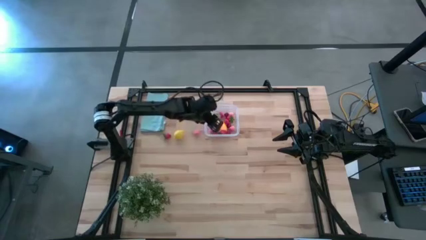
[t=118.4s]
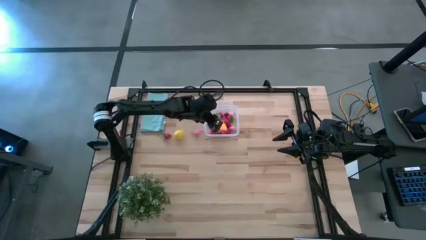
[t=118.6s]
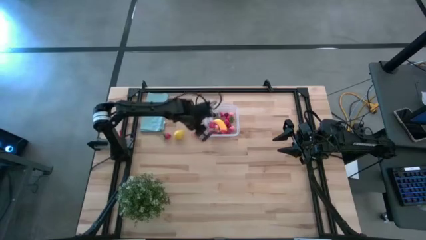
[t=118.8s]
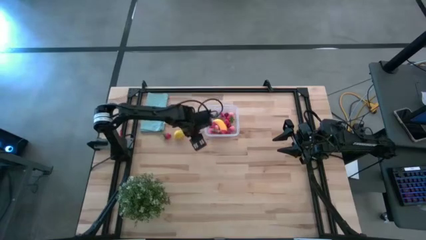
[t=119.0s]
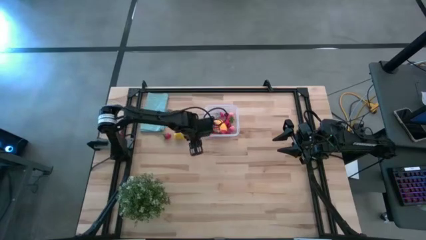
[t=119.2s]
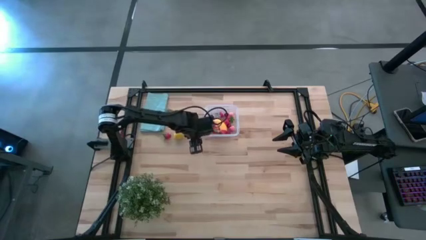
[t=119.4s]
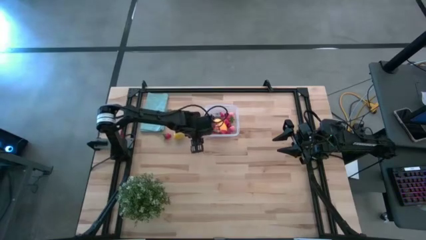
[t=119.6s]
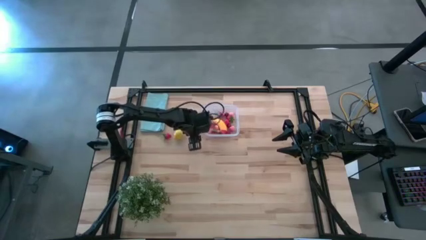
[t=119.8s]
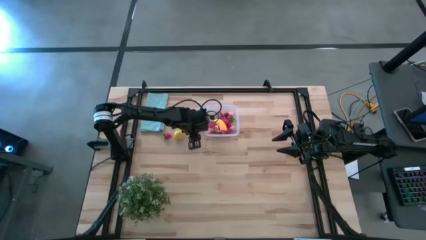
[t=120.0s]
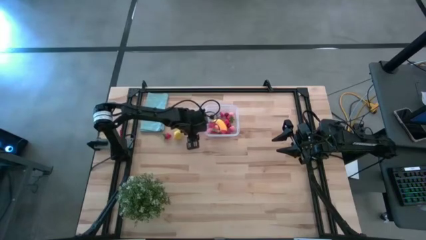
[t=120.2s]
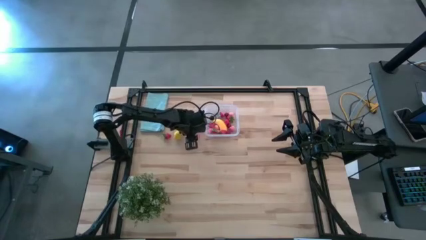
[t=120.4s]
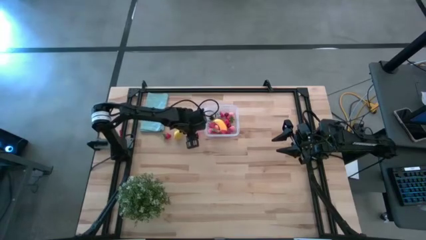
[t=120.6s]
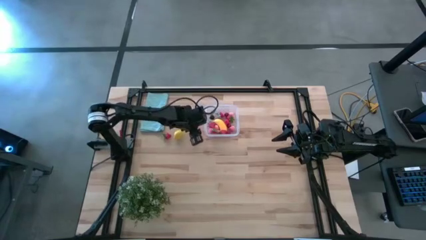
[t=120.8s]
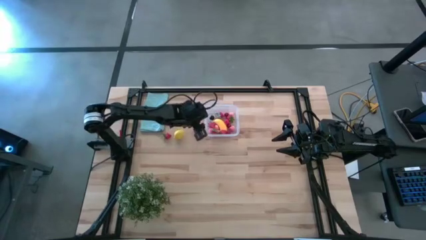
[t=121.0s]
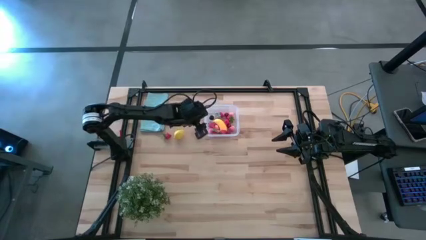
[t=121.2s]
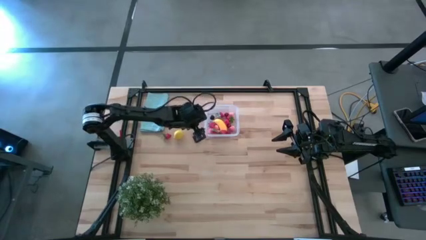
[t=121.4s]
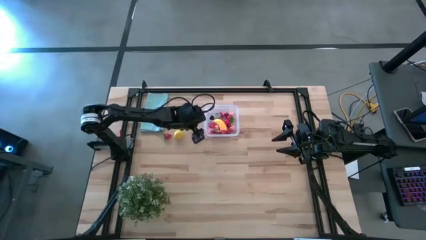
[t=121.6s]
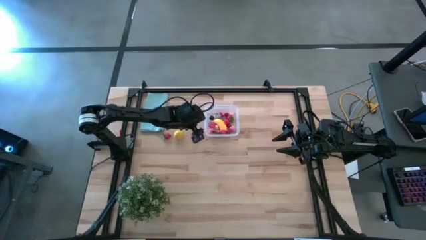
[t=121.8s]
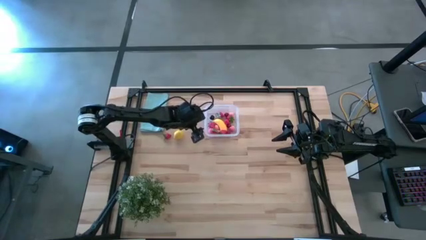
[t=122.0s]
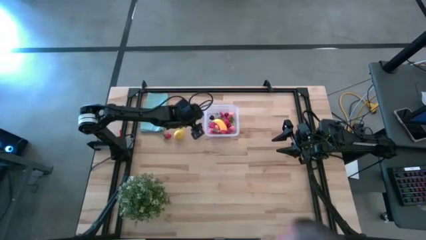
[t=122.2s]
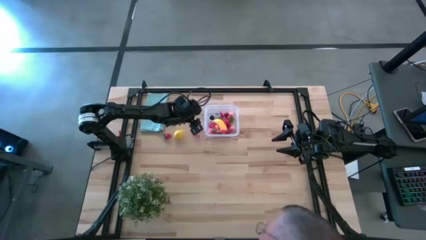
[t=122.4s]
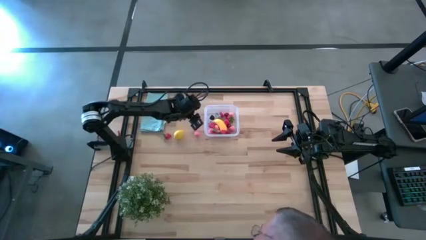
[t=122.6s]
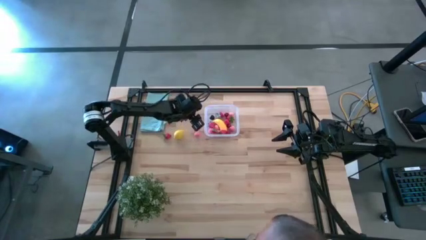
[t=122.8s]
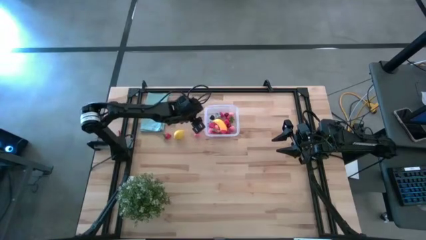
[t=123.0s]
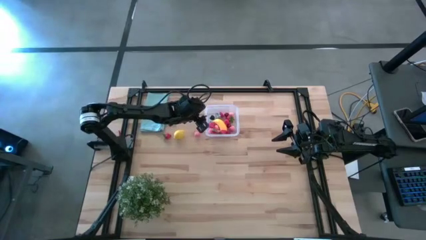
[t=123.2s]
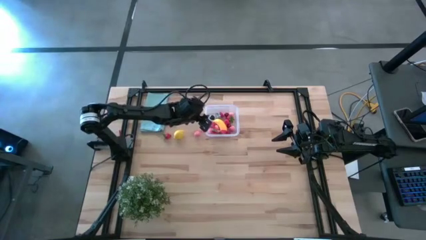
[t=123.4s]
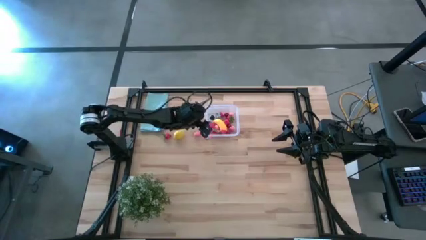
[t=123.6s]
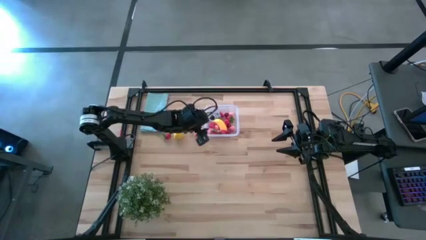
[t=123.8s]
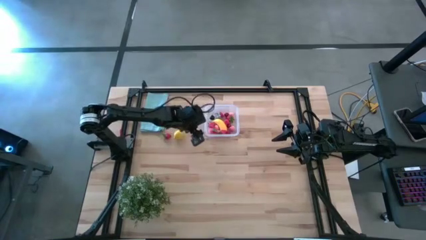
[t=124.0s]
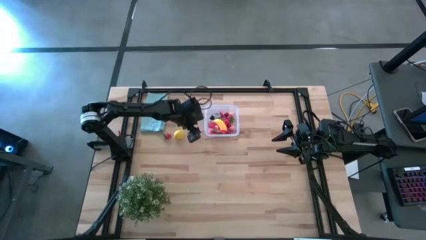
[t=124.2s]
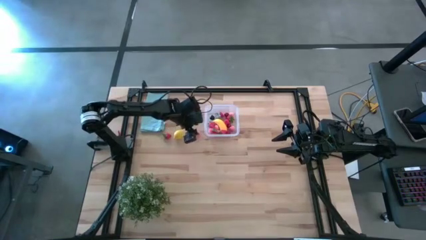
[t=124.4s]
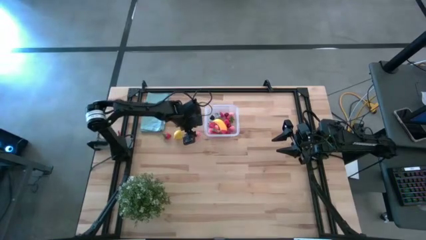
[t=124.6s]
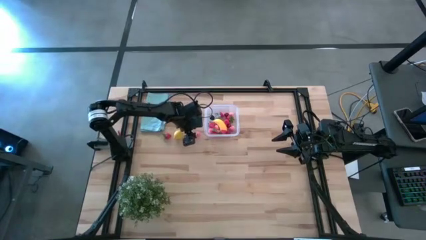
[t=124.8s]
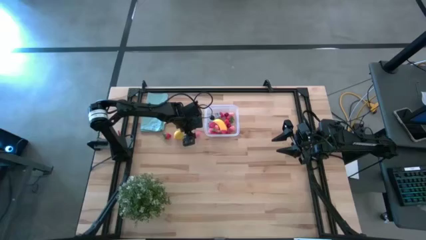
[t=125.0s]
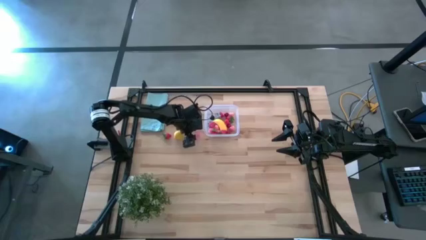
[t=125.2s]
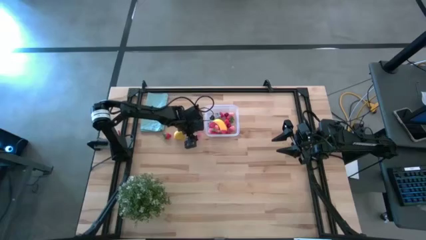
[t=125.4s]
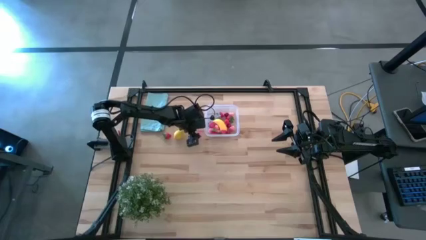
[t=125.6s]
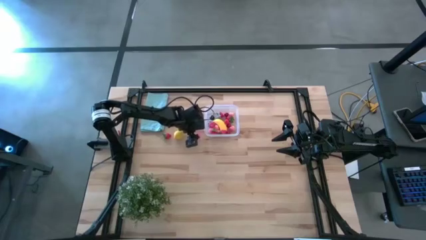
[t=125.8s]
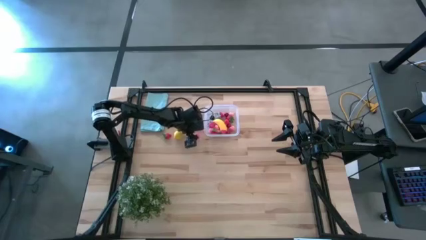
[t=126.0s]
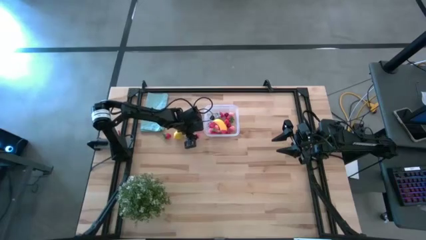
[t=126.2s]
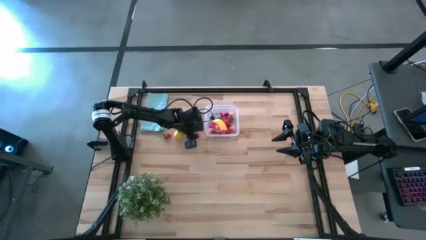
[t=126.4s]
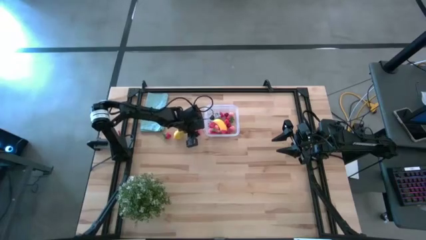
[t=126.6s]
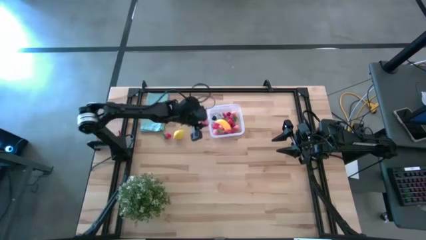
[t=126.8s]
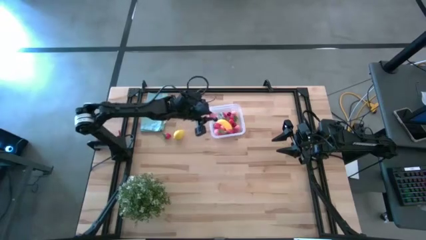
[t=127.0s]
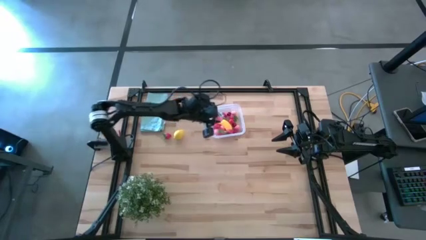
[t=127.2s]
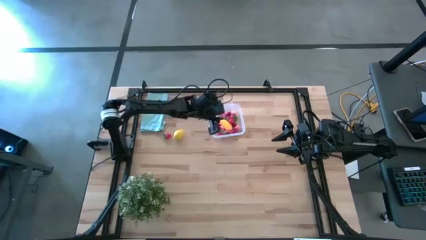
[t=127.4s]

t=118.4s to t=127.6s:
Task: Pick and placing Produce into tupperware
Put the pink peach into the transparent bin

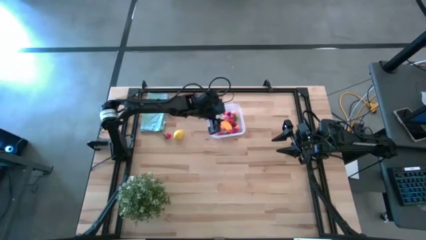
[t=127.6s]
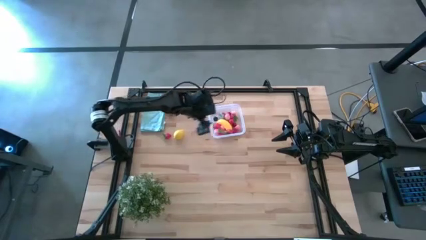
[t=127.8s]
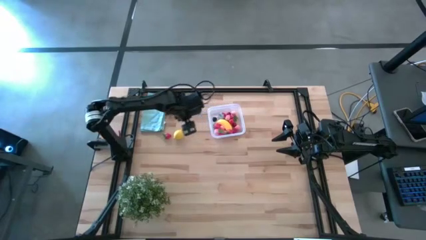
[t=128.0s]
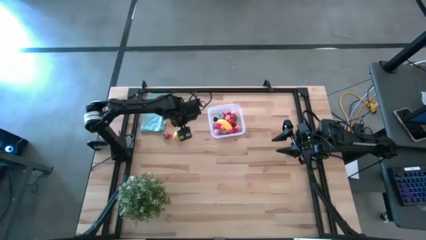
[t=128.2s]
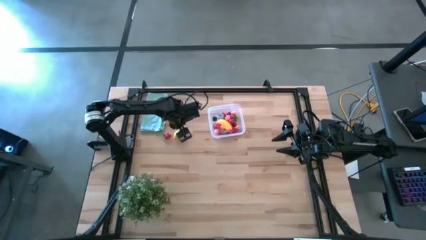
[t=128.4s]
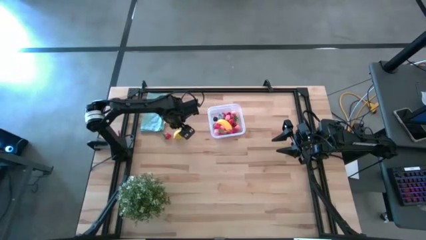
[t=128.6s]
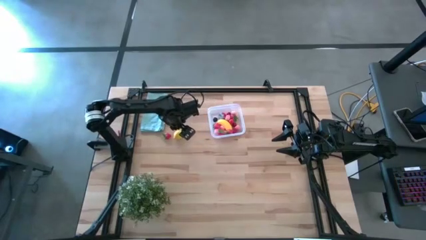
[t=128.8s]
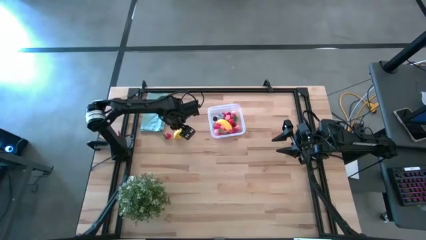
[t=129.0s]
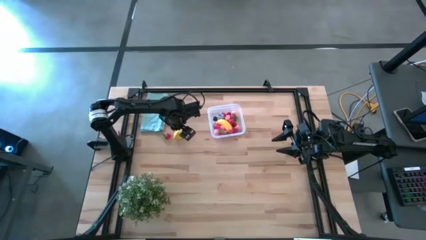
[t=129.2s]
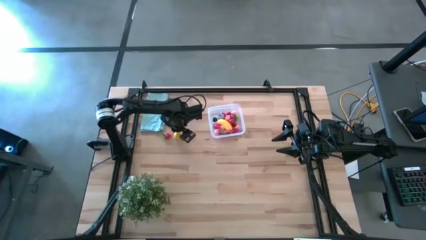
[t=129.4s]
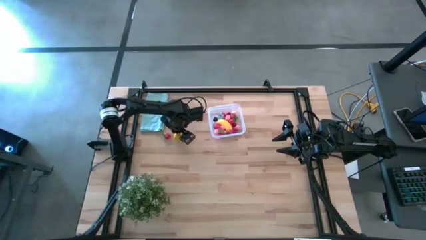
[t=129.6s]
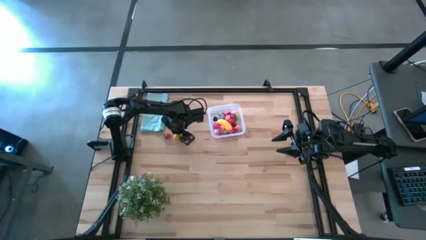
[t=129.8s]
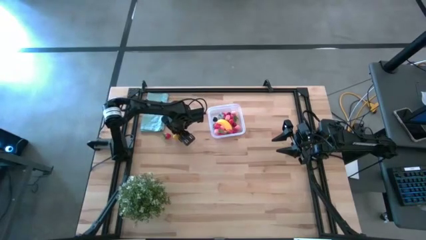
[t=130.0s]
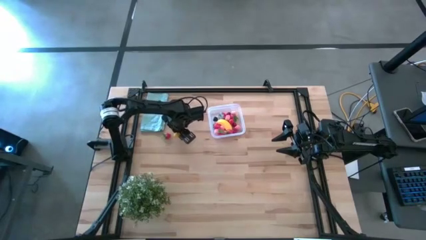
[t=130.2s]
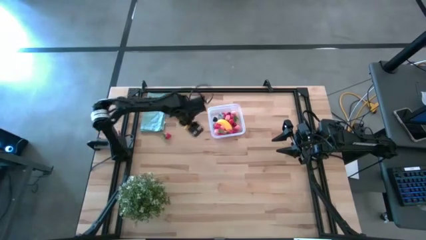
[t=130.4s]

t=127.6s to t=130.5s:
Put the yellow lemon into the transparent bin

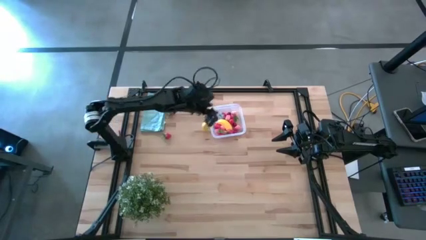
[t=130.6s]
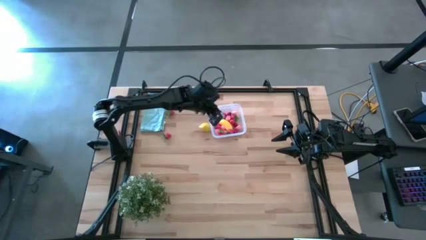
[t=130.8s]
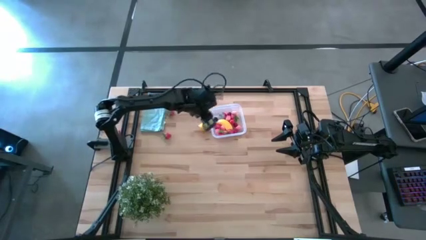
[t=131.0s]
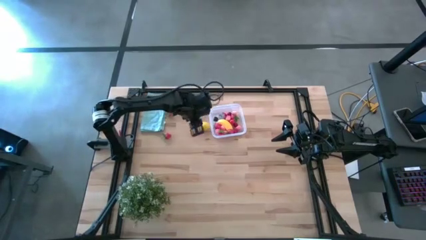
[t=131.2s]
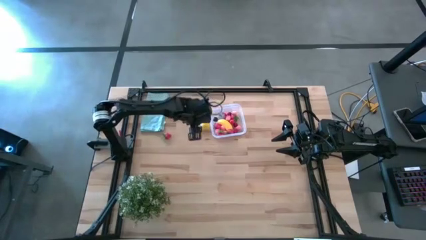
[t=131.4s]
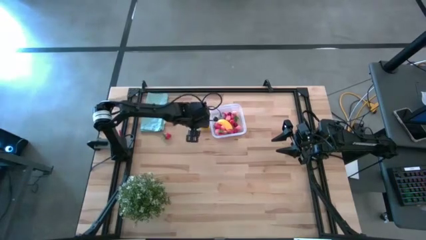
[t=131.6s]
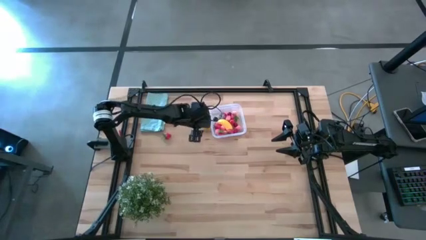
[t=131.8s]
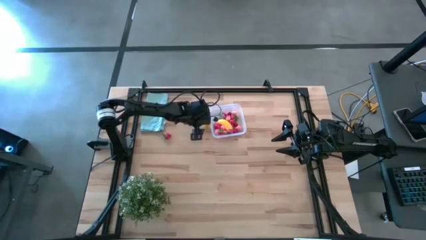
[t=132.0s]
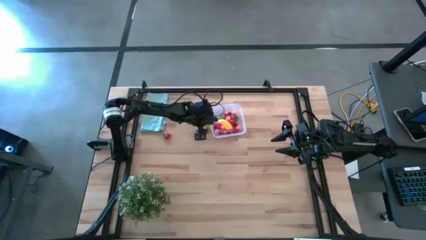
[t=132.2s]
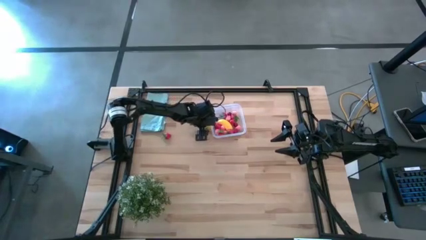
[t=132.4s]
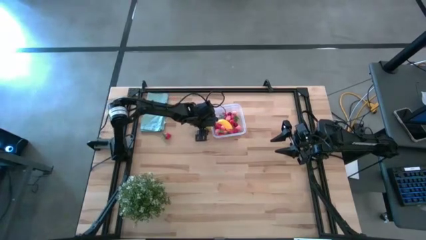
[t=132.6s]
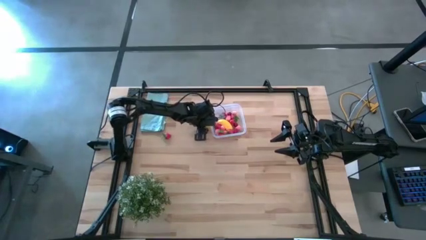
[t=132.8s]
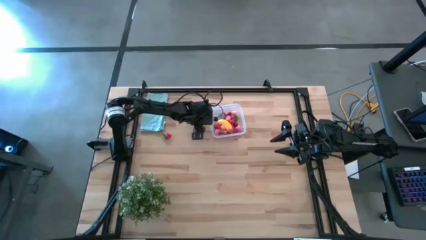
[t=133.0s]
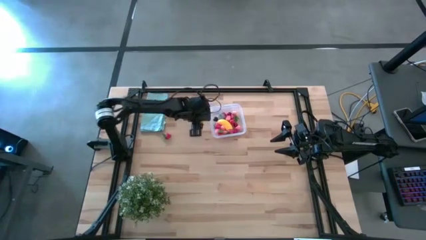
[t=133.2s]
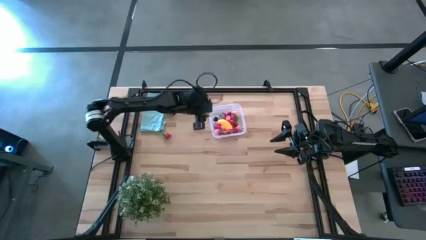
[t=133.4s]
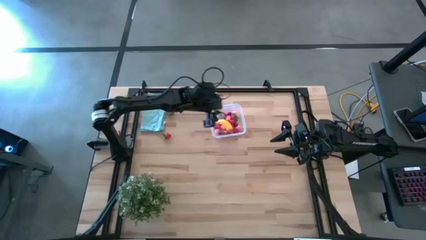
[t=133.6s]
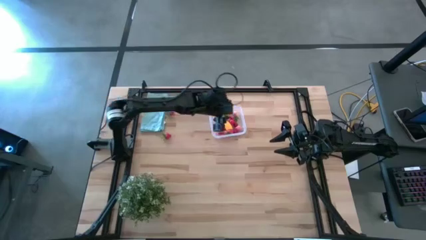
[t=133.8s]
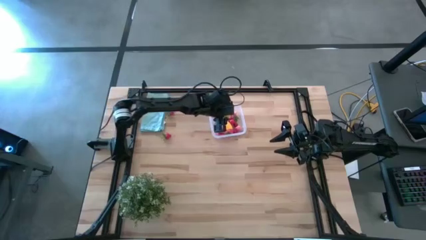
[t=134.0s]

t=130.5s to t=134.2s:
Put the yellow lemon into the transparent bin

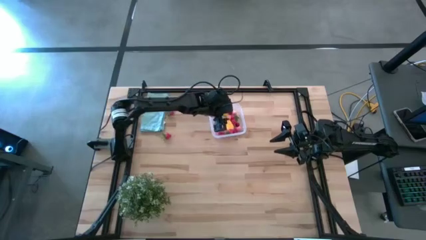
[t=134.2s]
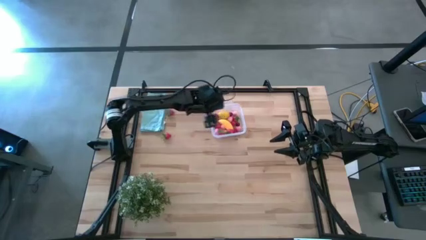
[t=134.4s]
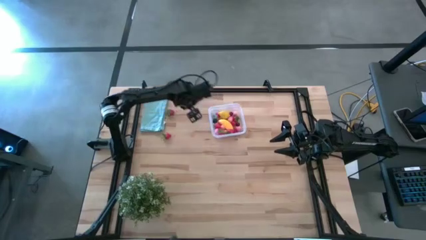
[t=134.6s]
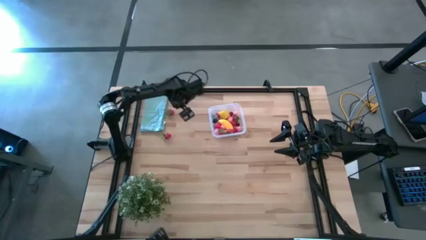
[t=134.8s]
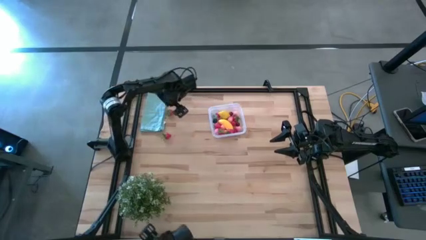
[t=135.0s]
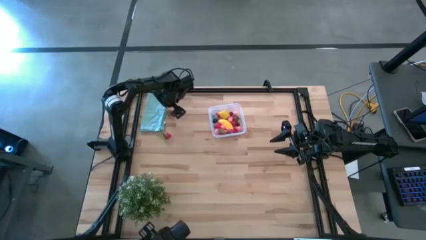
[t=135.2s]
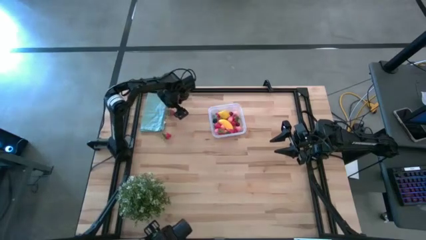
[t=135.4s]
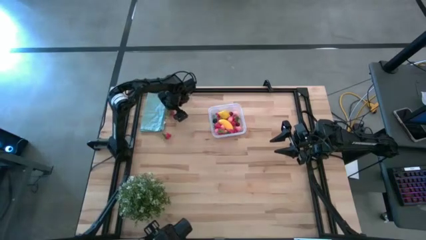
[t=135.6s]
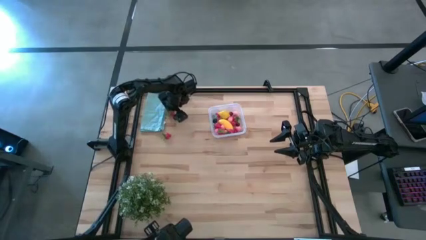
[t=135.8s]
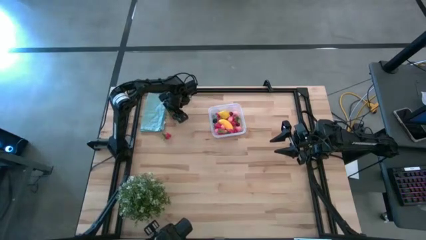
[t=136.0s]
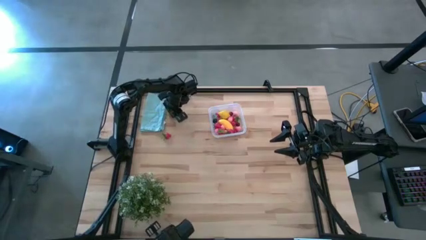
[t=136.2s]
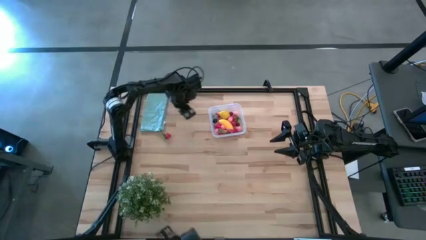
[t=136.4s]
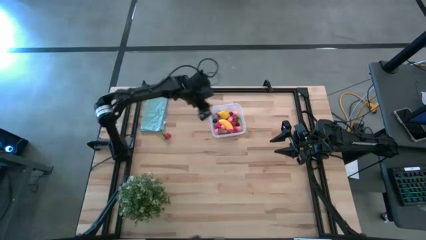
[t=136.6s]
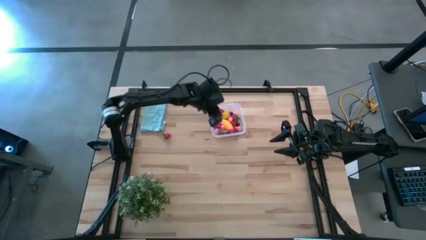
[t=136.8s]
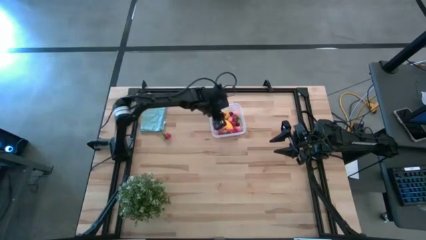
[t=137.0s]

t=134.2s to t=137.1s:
Put the red strawberry into the transparent bin
